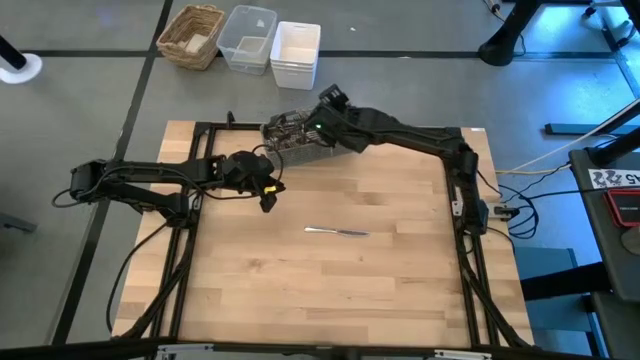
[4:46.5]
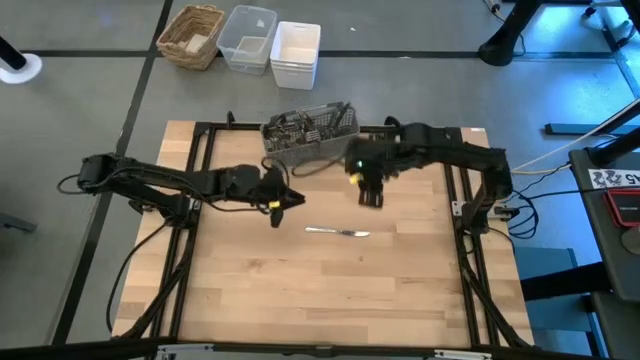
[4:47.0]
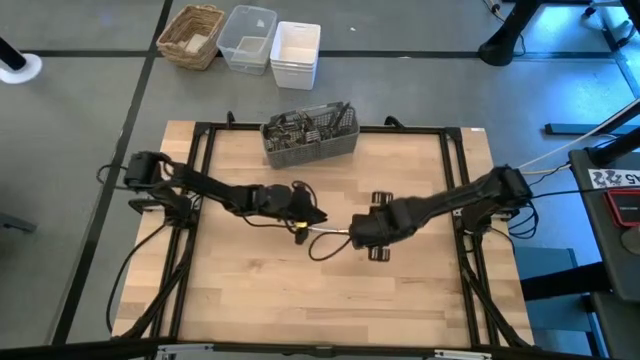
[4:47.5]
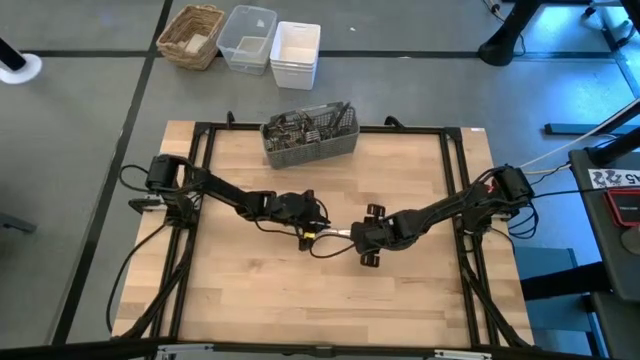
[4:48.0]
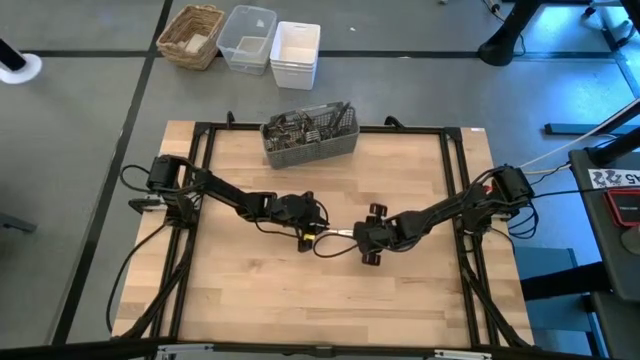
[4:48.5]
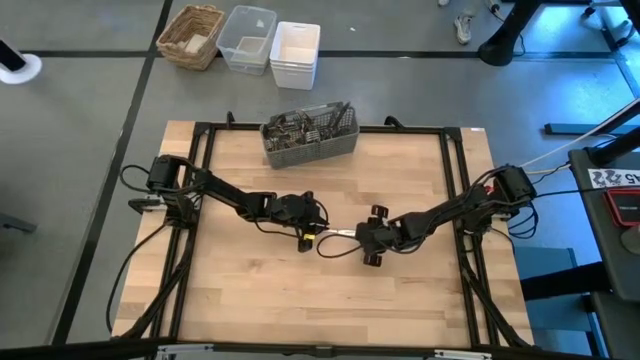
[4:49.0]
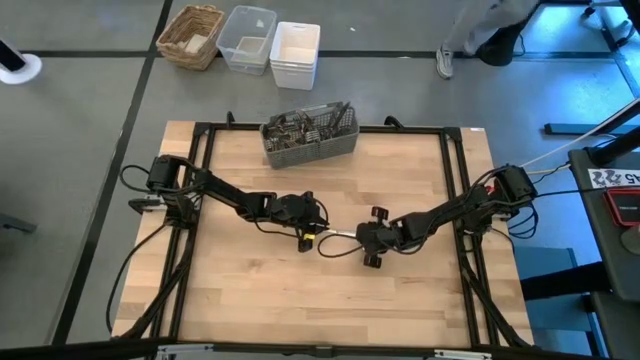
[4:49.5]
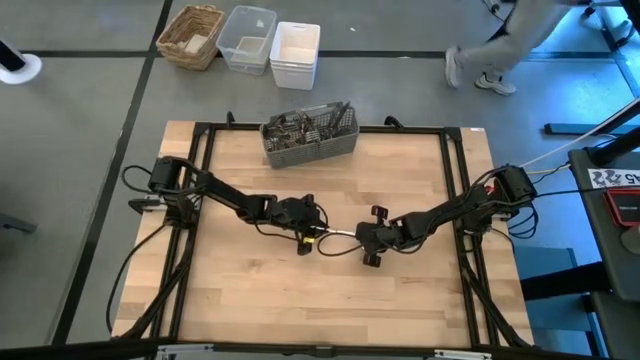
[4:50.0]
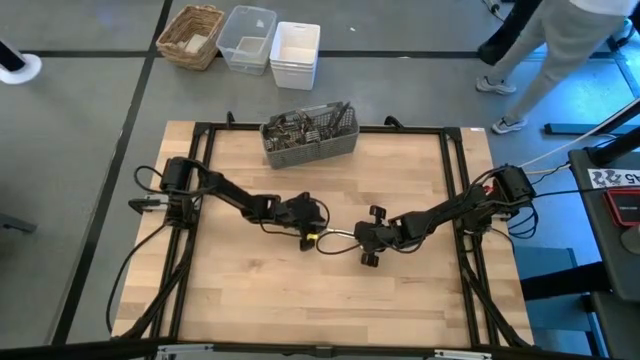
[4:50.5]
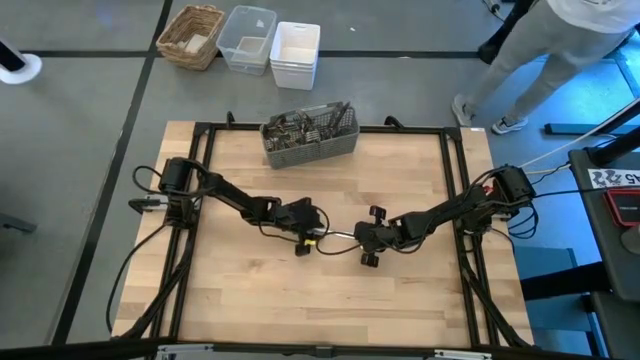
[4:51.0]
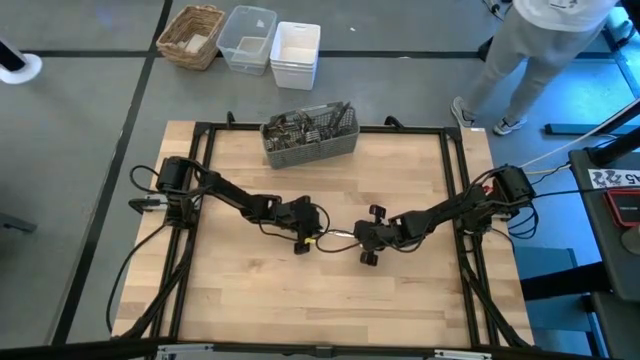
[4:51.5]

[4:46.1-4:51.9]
Task: Sort silverware
Put the silver knife into the silverware rack

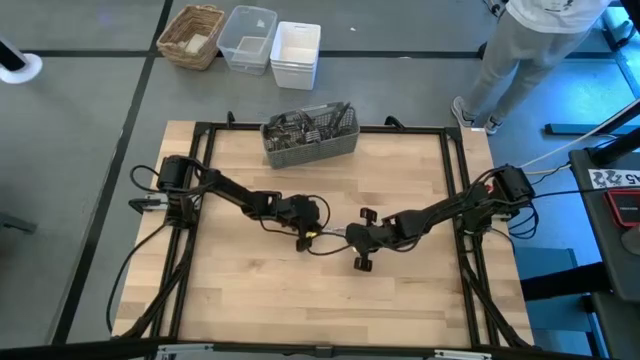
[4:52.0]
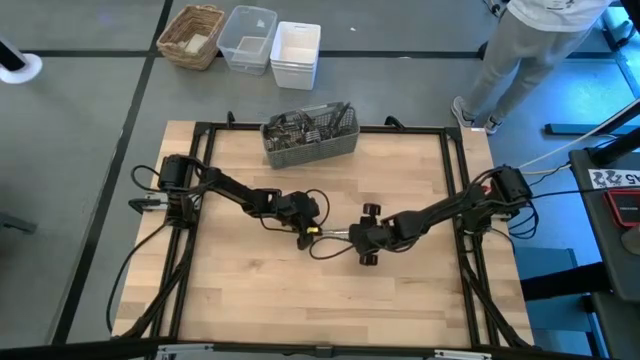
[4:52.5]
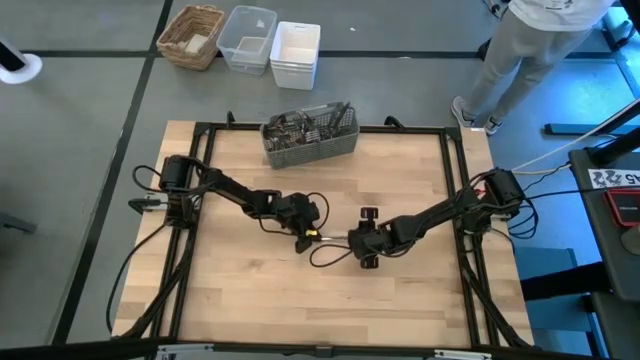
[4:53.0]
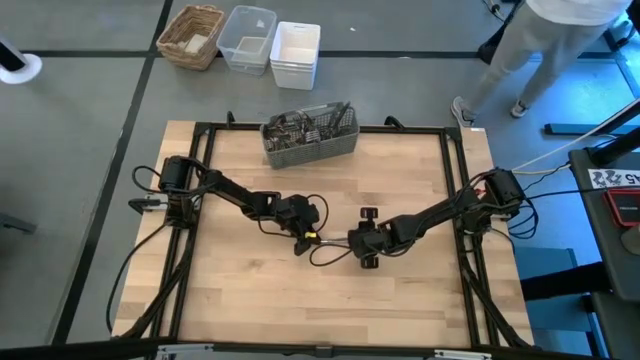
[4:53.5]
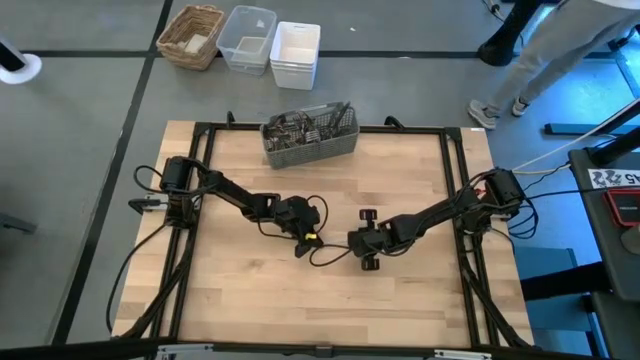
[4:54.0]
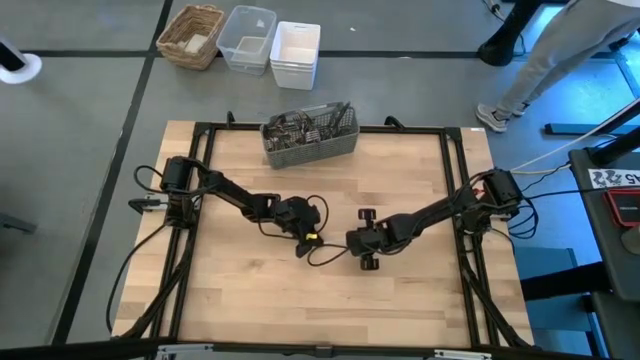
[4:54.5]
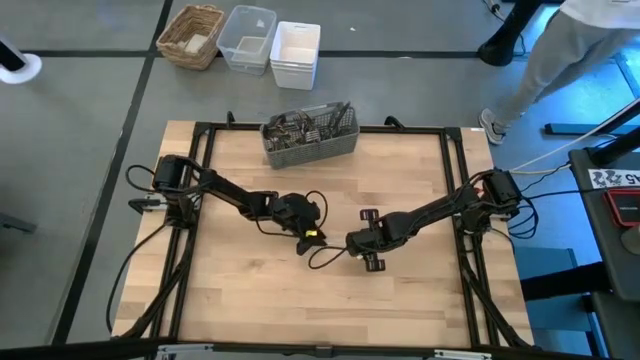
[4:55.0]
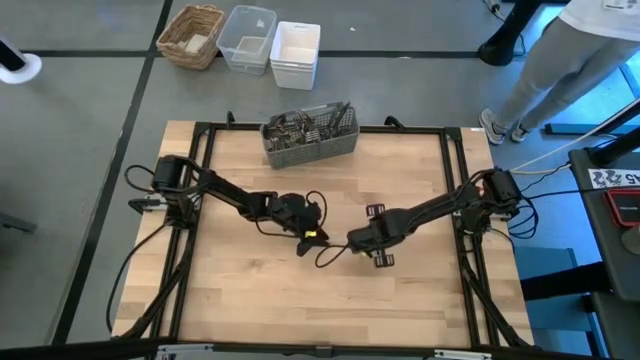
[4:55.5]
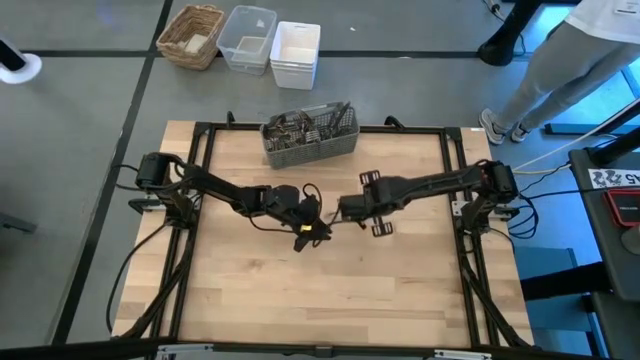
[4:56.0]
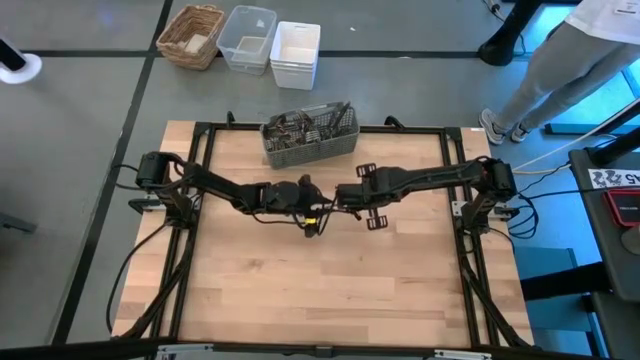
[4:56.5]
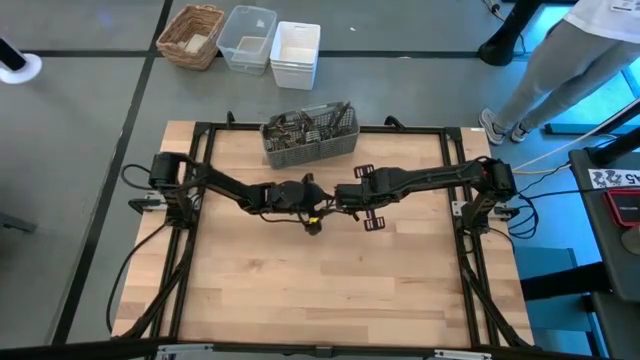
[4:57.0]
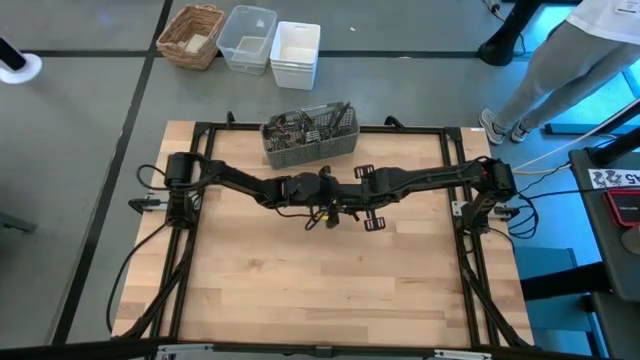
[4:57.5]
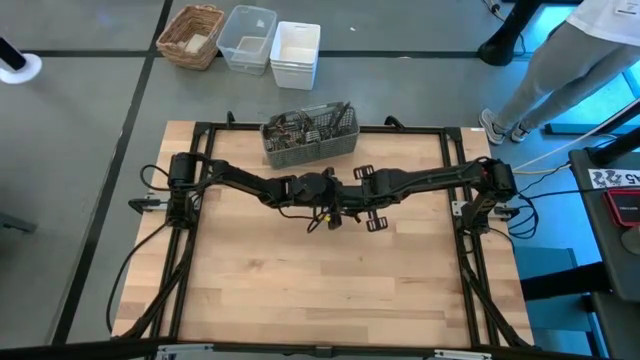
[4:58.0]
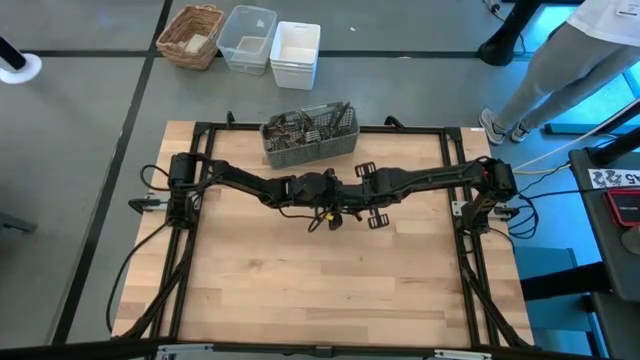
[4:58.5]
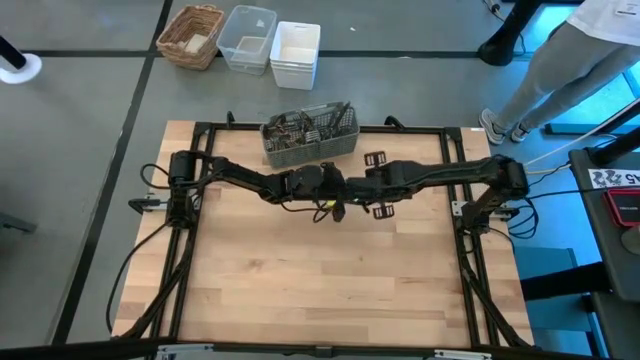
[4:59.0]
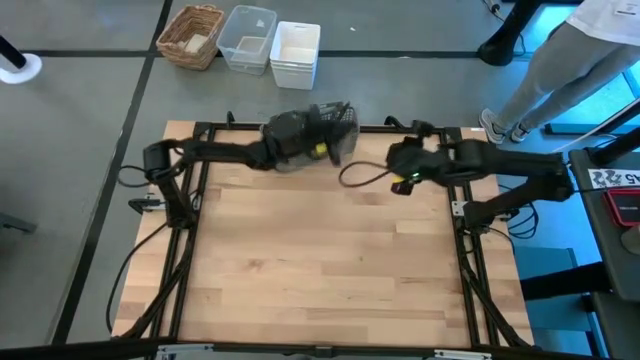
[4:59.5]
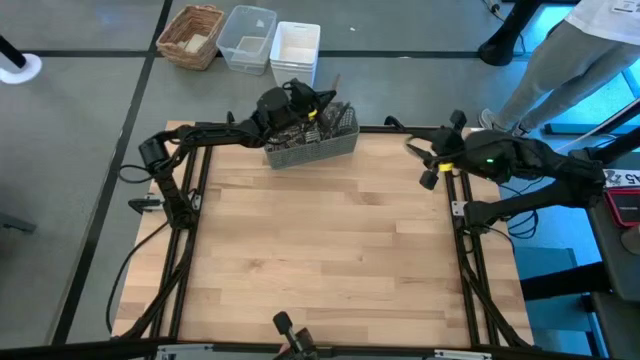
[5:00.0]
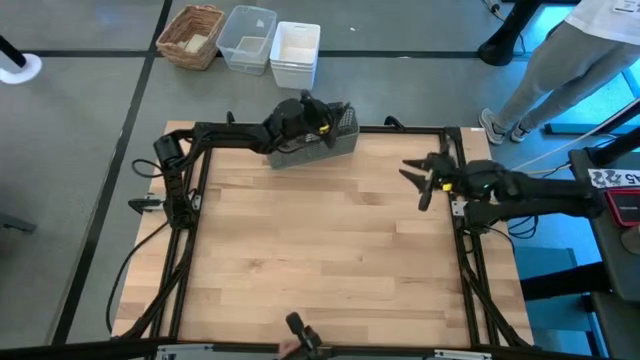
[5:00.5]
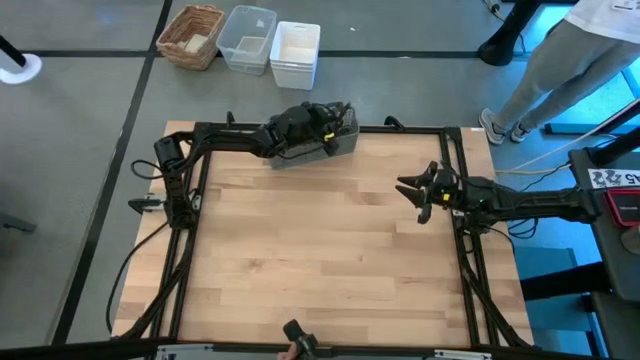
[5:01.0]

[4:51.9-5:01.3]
Put the silver knife into the silverware rack

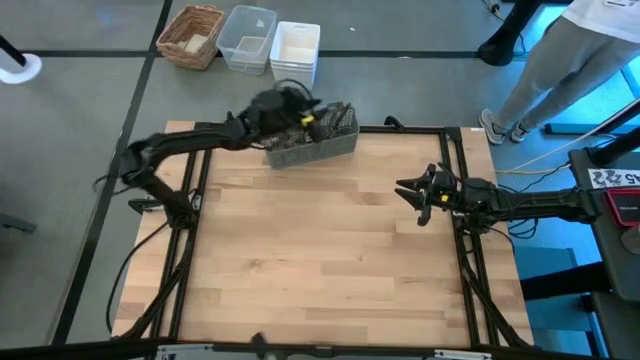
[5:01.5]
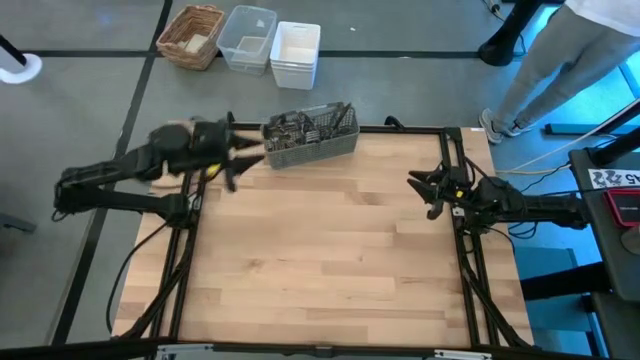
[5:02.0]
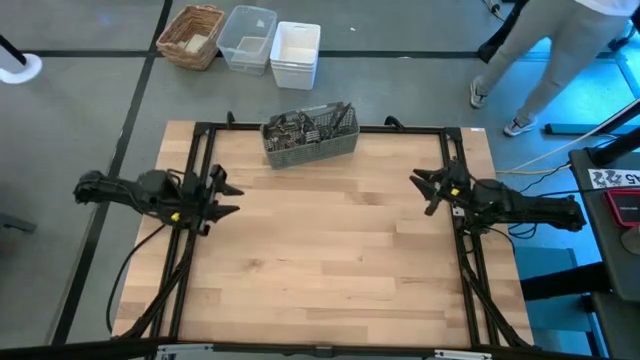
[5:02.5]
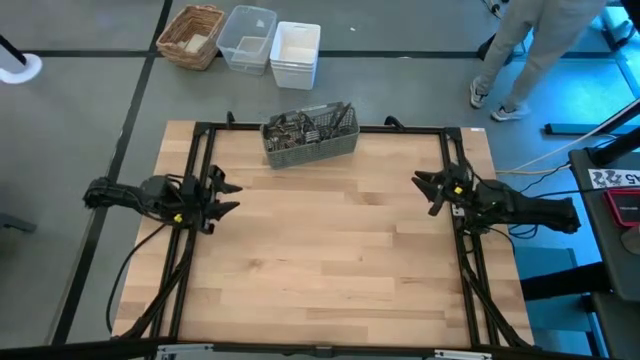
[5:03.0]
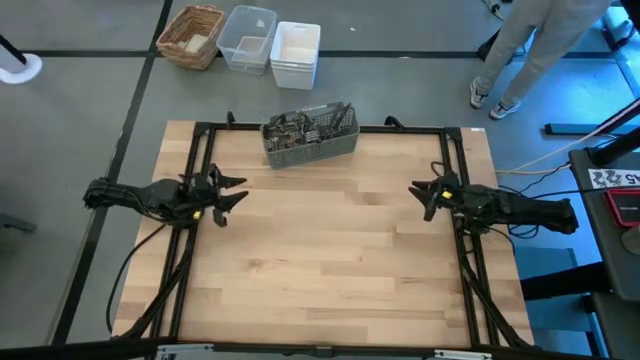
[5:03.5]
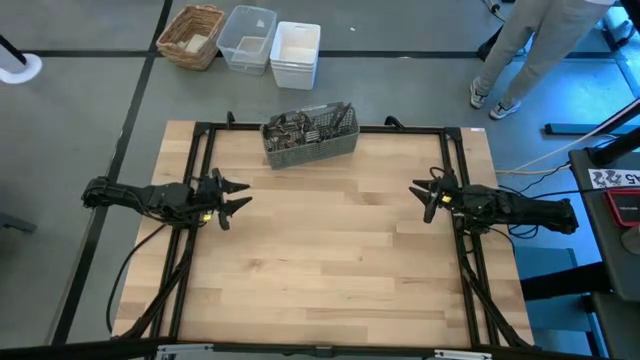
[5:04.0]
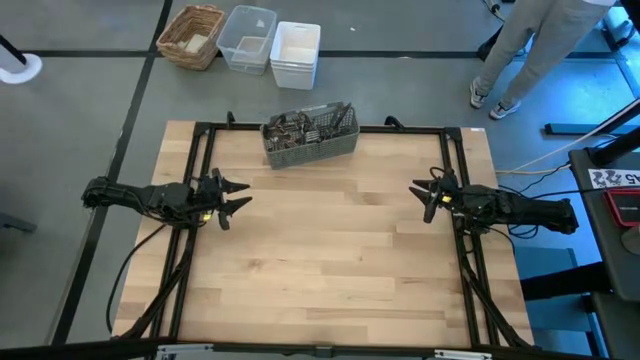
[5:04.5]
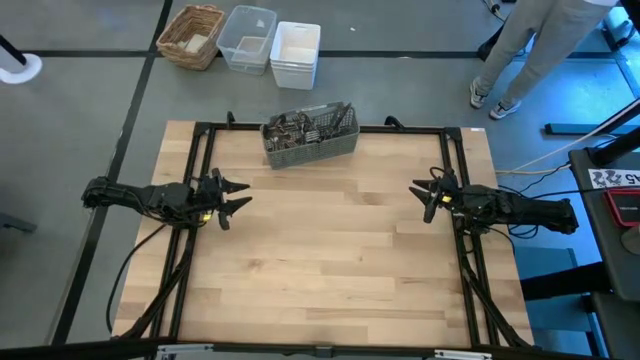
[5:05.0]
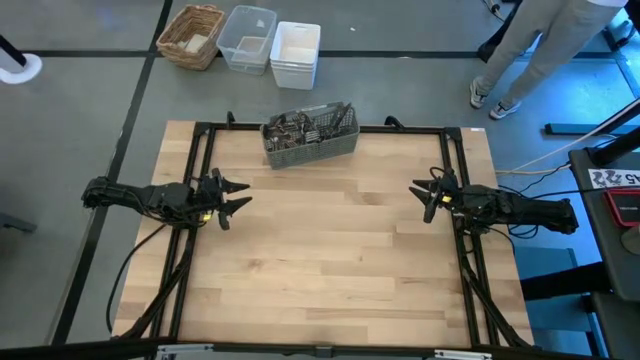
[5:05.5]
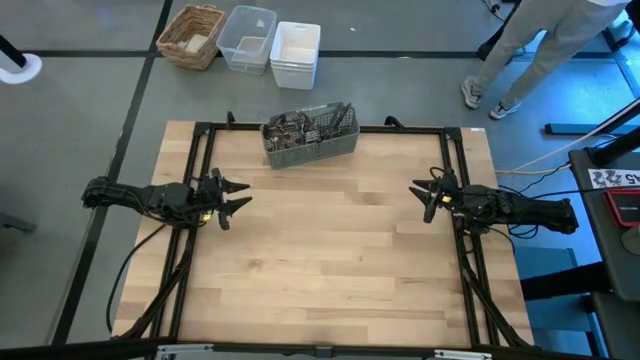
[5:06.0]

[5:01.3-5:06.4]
Return to Home Position

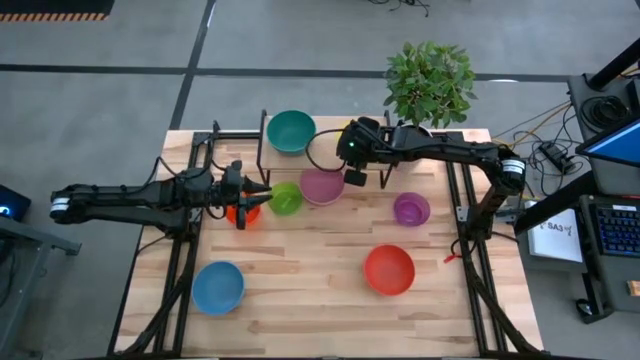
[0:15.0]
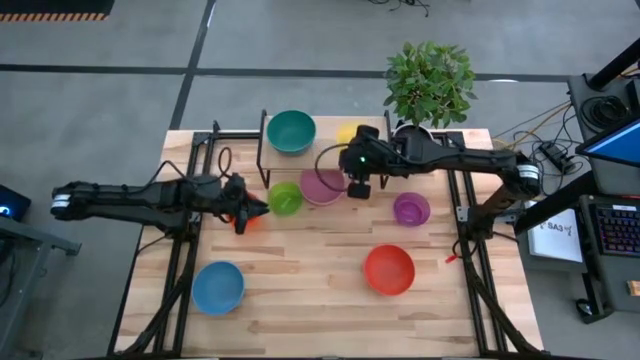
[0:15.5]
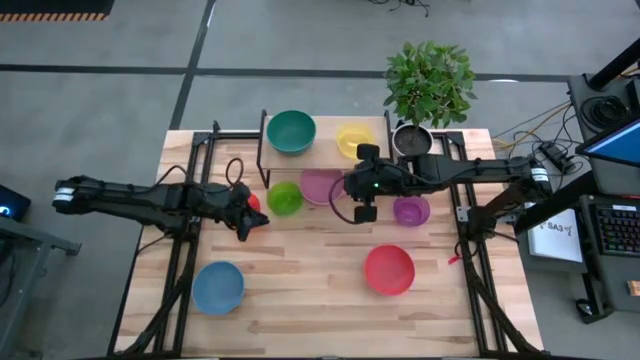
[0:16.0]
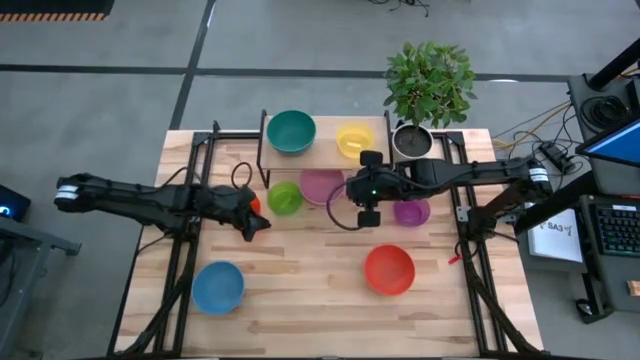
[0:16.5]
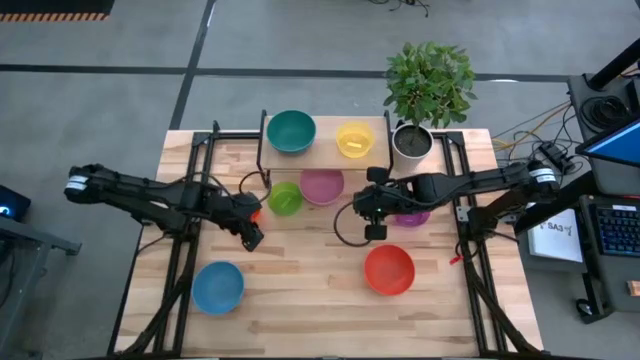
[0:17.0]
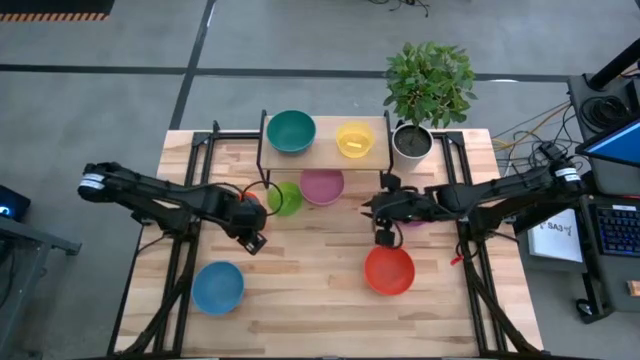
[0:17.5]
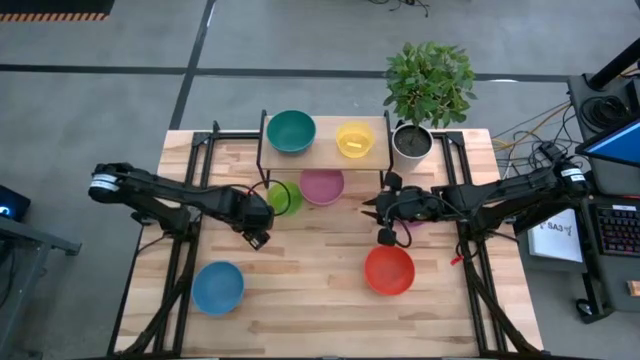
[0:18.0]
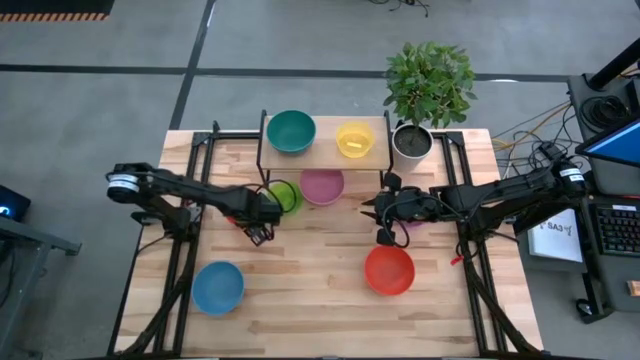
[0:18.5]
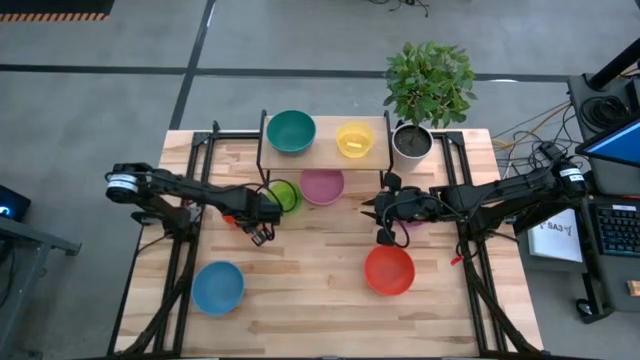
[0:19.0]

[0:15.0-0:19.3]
Task: Place and stack bowls onto a shelf
Stack the small orange bowl on the yellow bowl on the shelf
